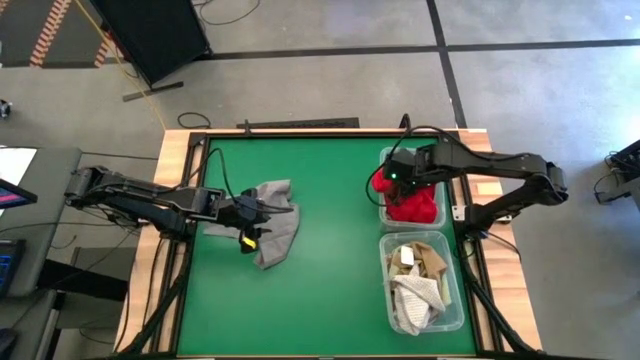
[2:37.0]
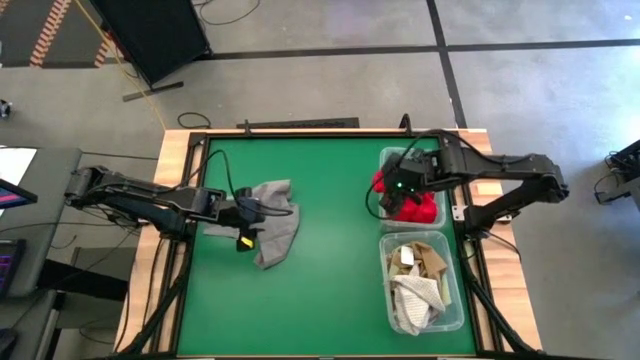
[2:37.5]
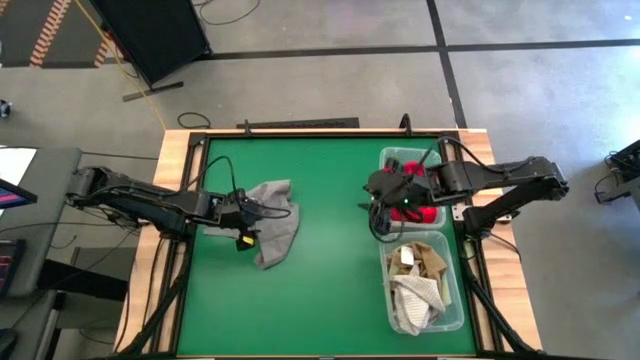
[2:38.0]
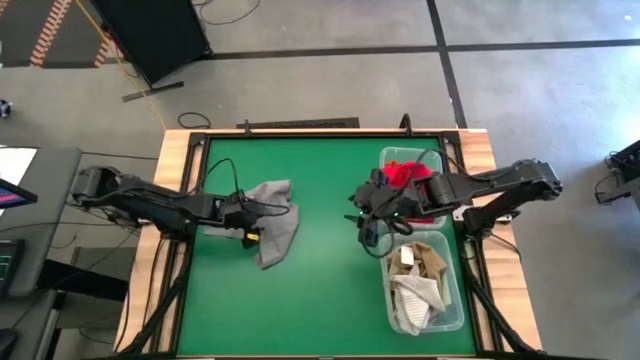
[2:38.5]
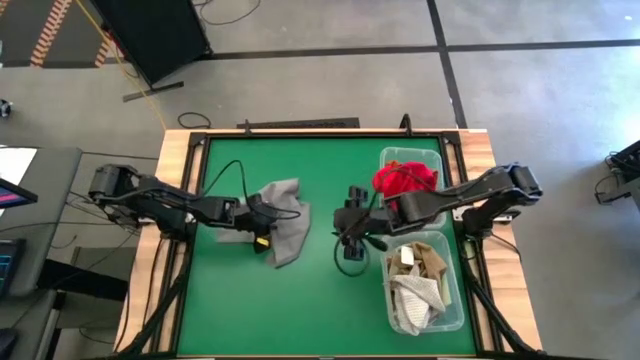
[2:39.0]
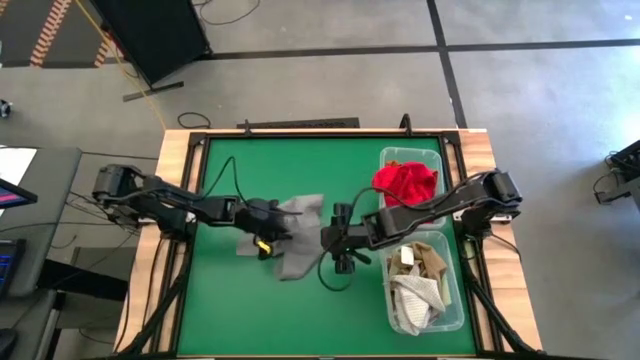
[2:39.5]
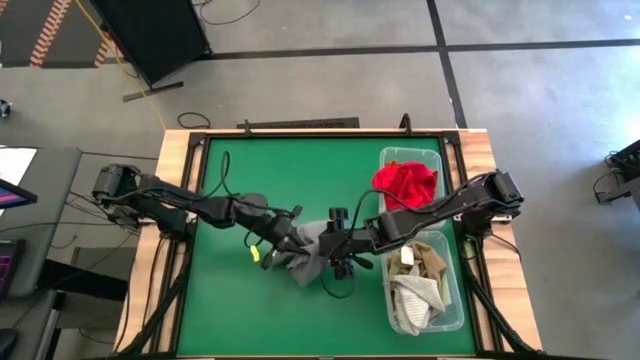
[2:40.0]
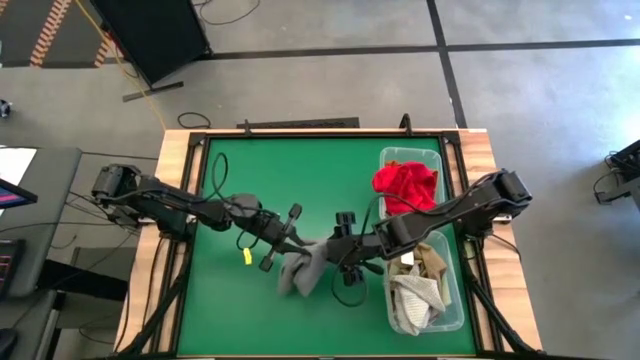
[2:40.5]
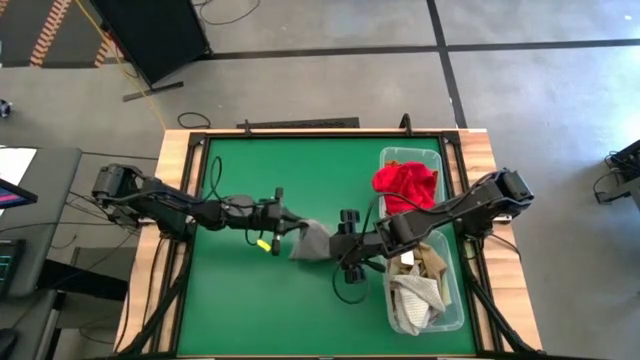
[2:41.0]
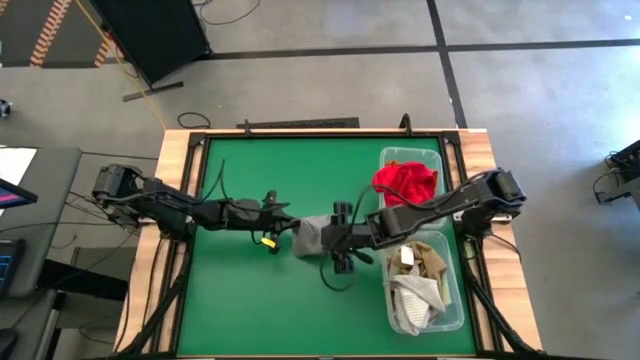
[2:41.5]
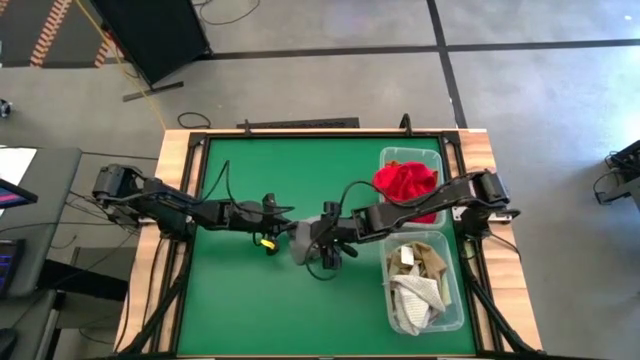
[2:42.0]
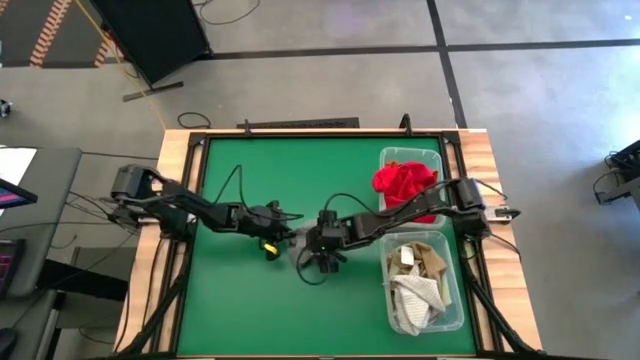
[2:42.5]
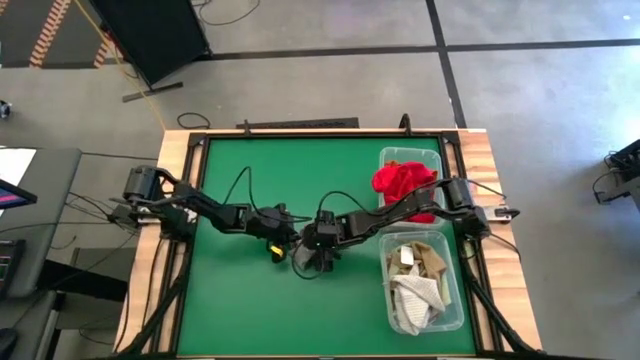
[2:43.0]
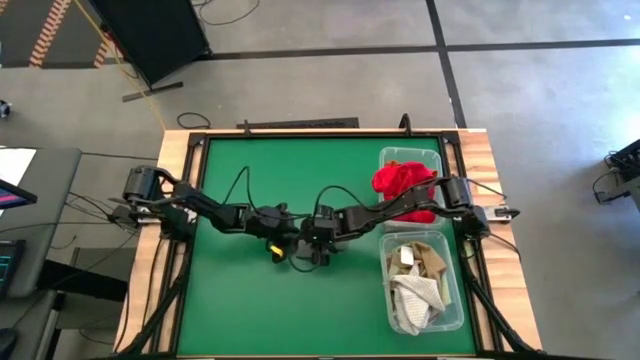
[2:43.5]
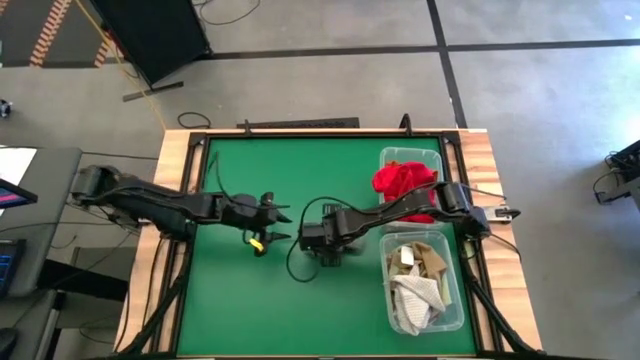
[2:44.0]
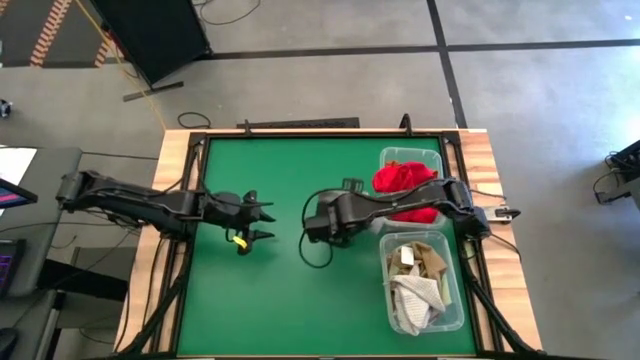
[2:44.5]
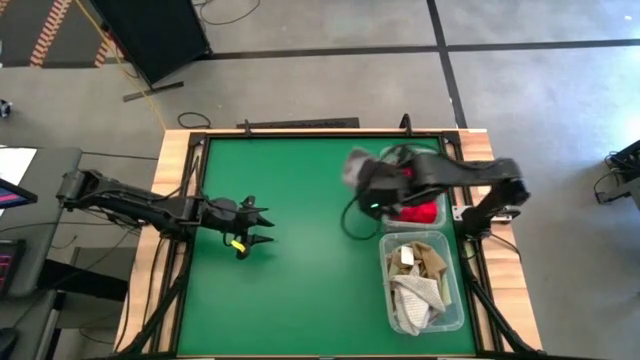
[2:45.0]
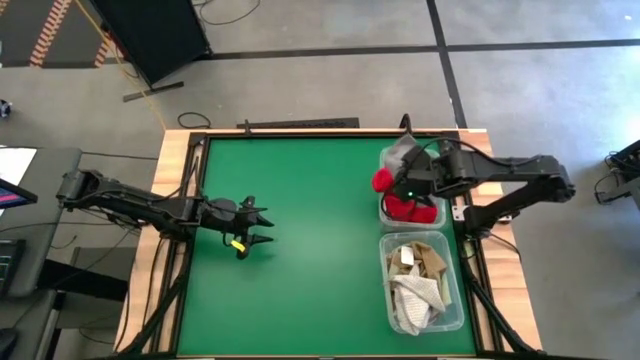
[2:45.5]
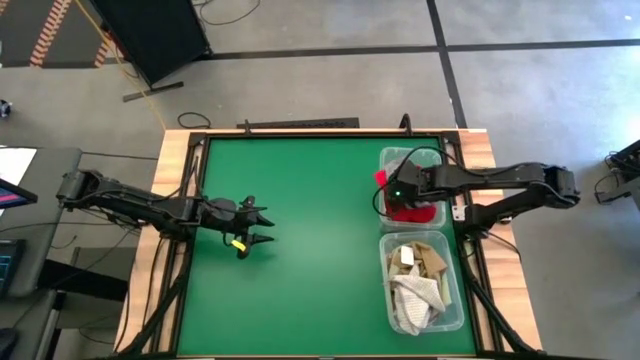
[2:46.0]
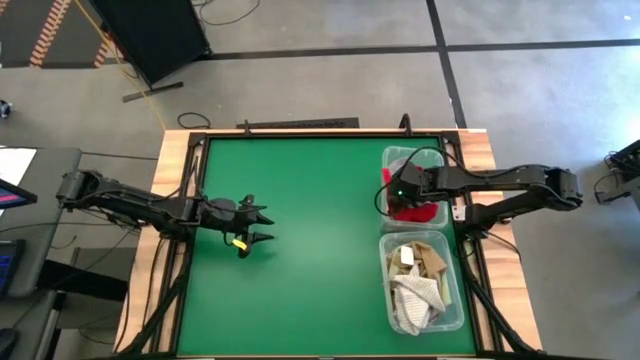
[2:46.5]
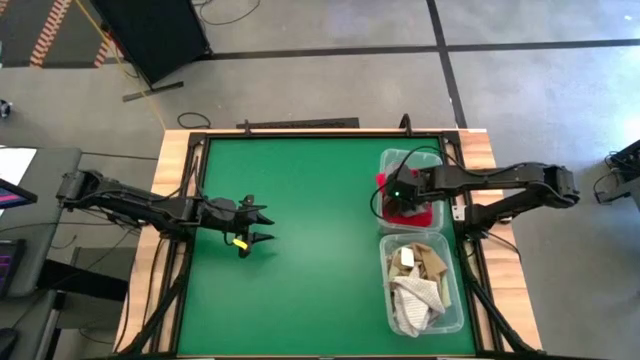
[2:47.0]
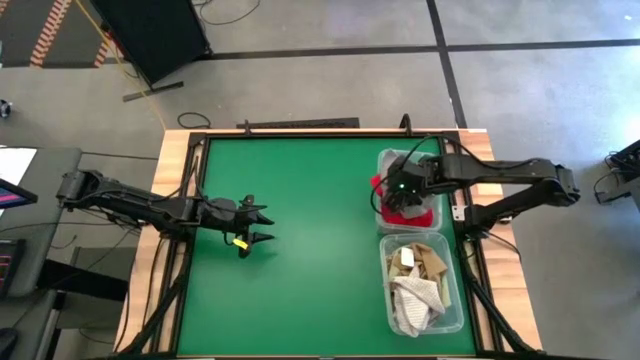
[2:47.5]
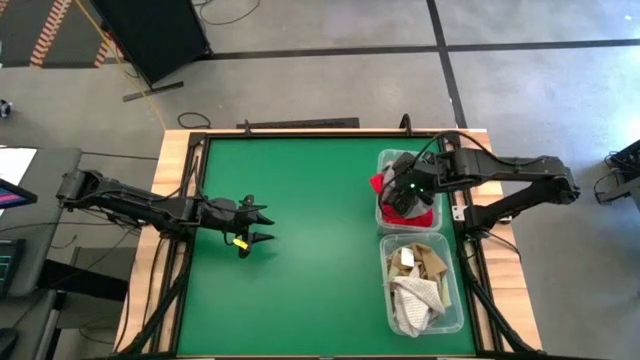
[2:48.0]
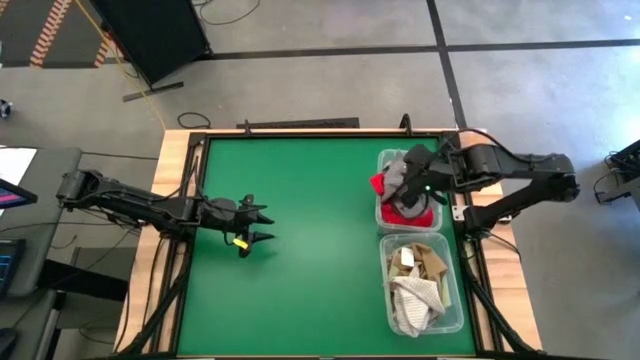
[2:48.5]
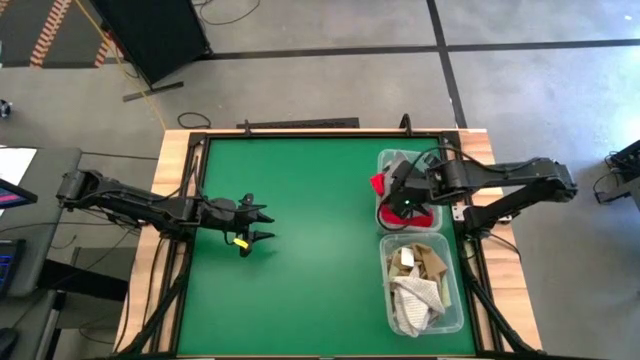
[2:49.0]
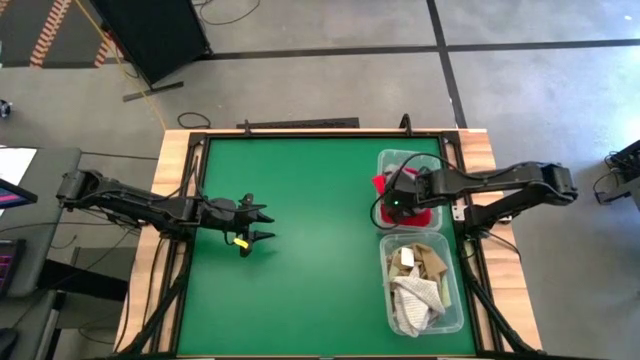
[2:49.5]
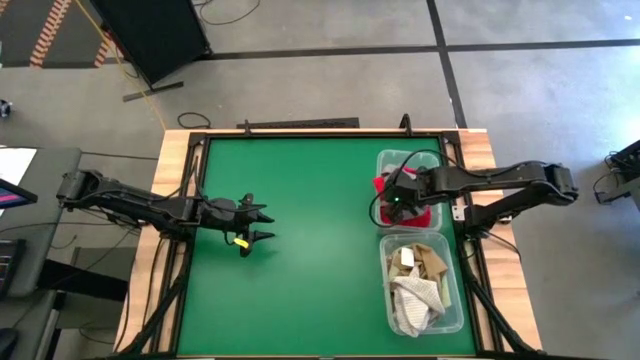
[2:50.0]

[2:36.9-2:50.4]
Task: Sort towels by color in basket
Put the grey towel into the top transparent bin

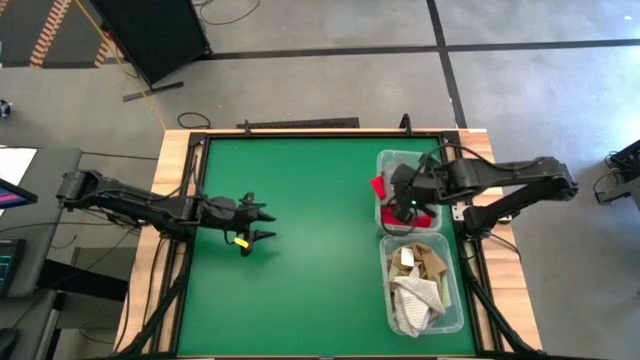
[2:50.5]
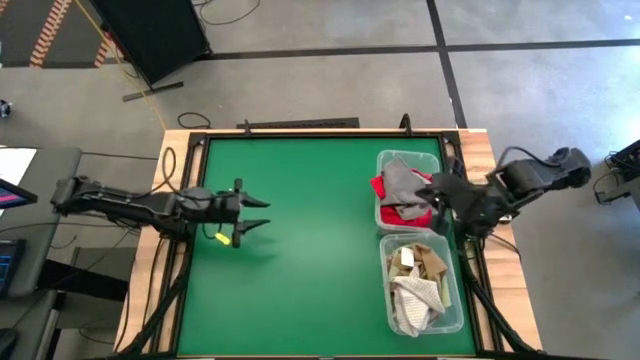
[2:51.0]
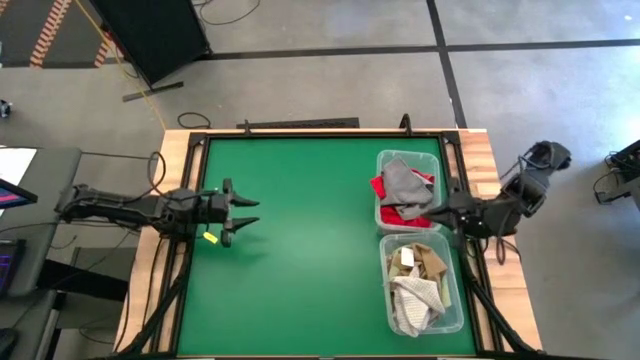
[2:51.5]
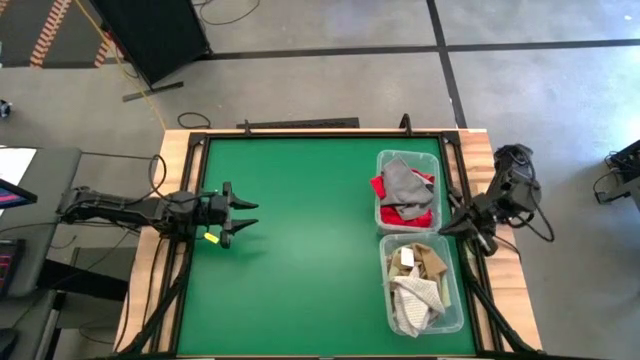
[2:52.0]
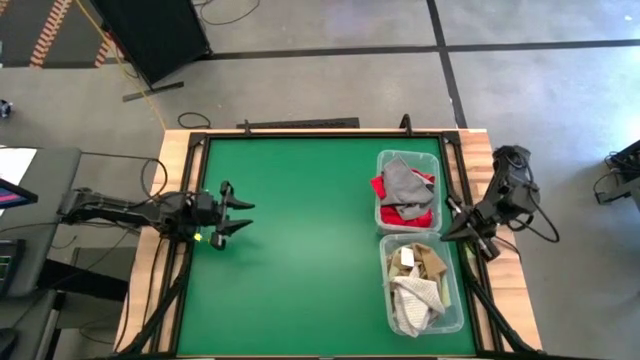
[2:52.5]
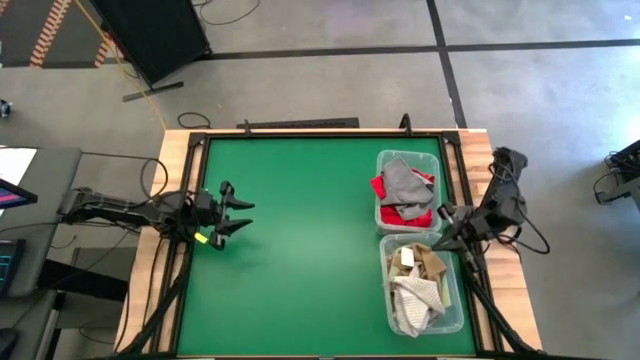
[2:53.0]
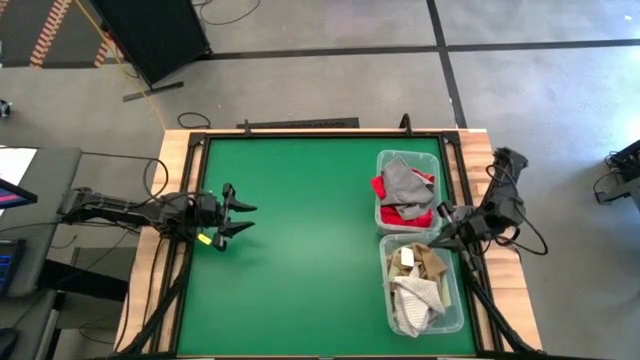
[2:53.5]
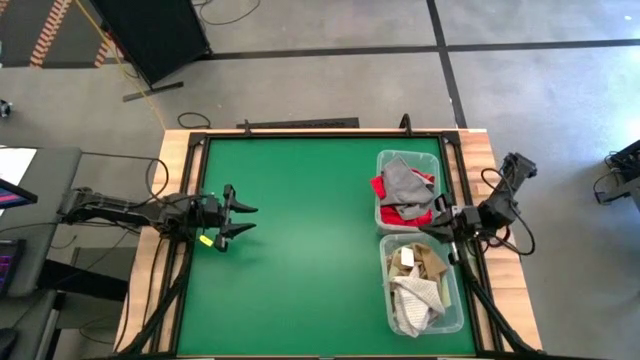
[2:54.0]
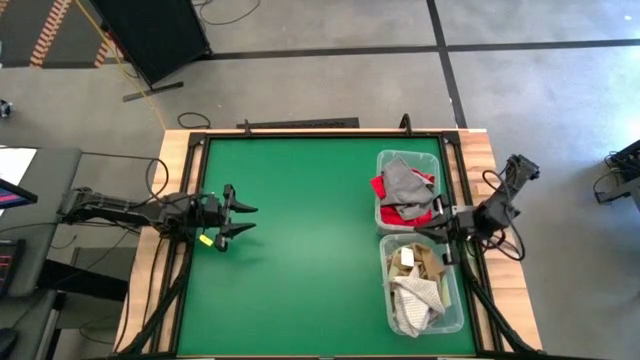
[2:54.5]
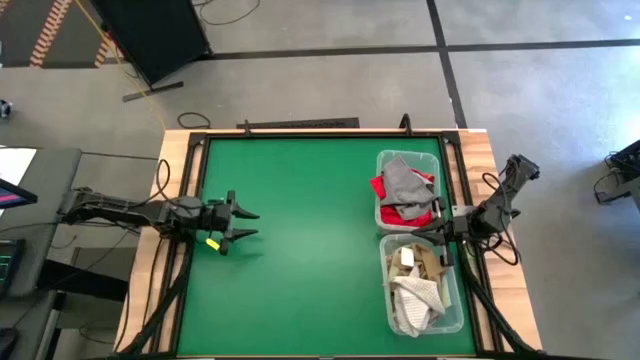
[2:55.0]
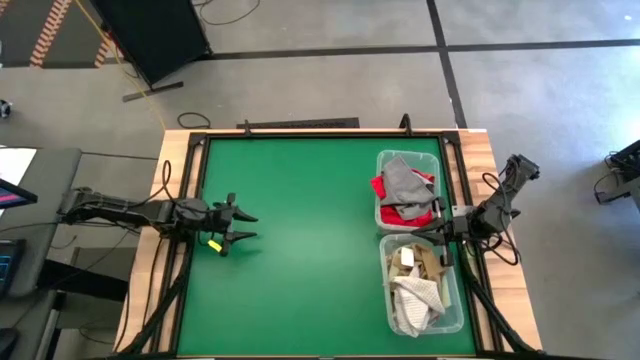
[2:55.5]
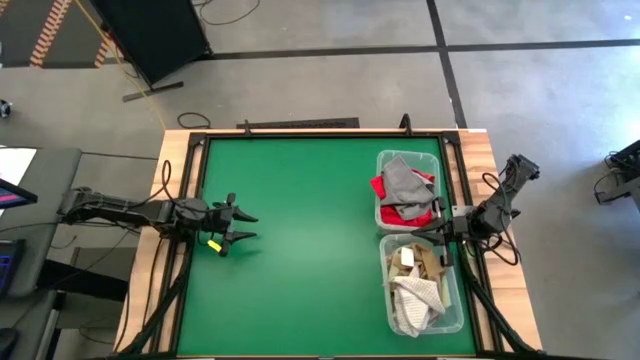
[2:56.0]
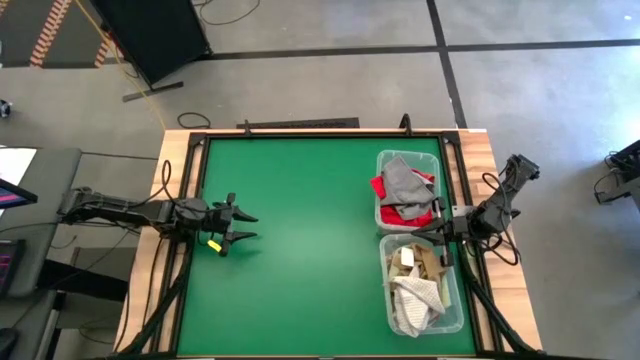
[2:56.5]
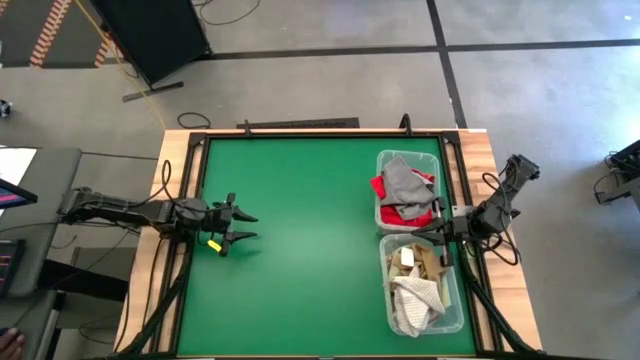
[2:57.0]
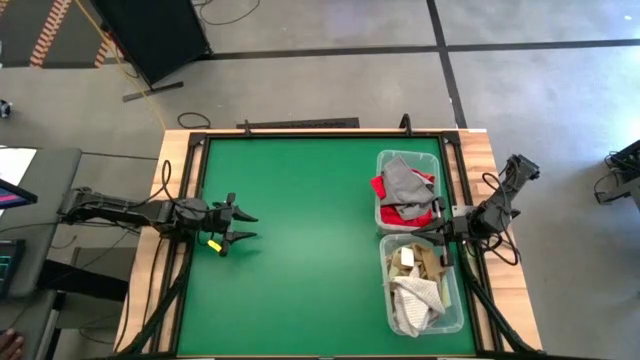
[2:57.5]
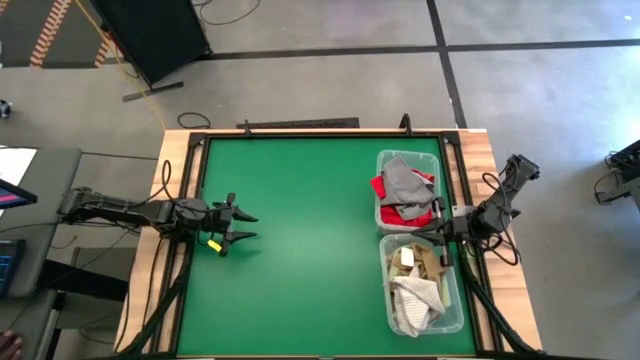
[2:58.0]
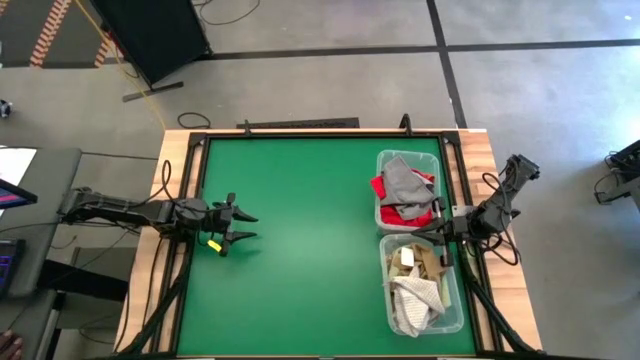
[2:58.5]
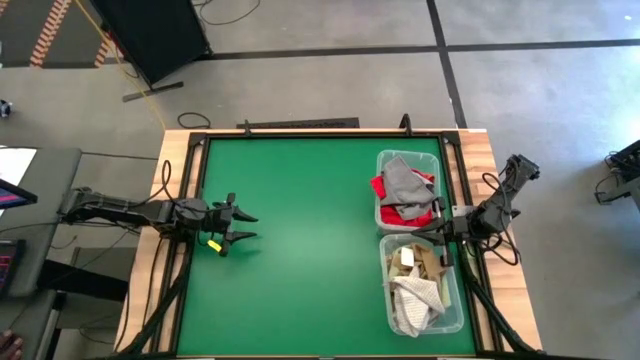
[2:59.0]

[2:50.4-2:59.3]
Return to Home Position
